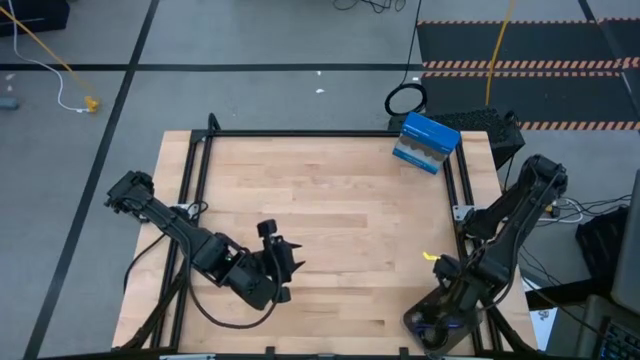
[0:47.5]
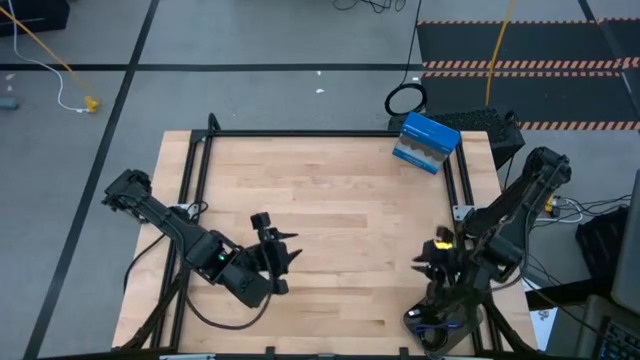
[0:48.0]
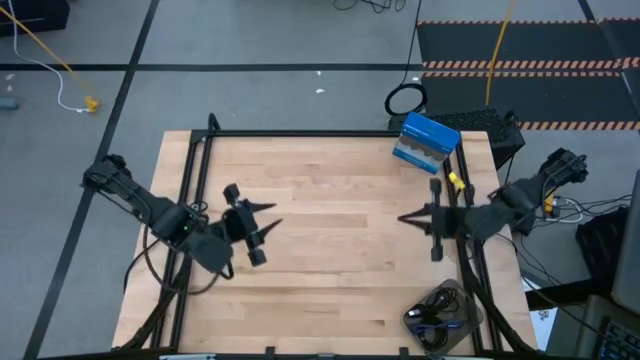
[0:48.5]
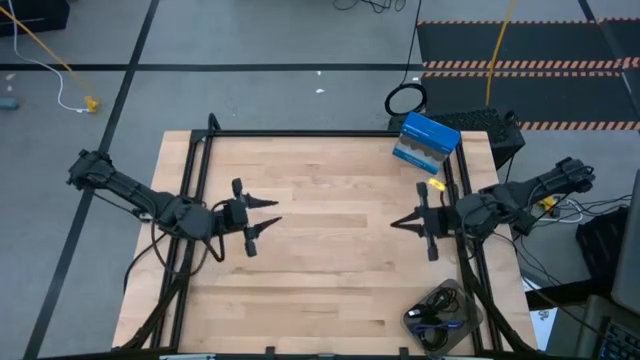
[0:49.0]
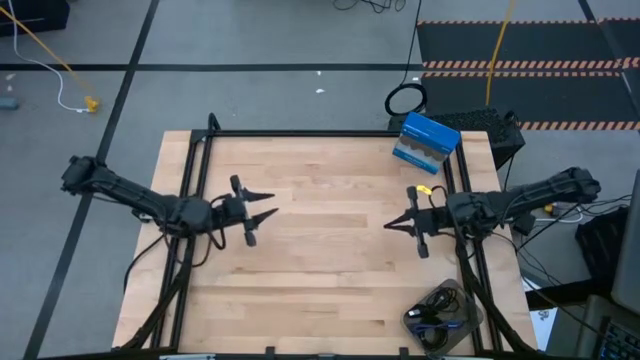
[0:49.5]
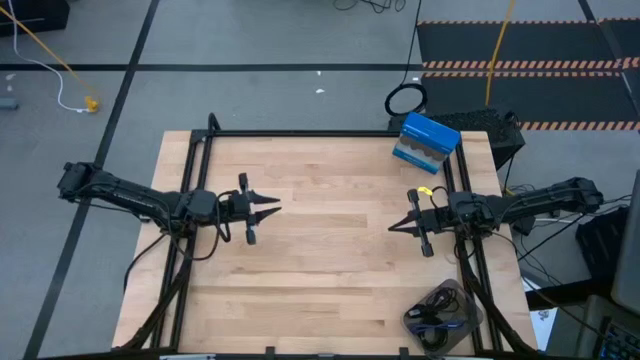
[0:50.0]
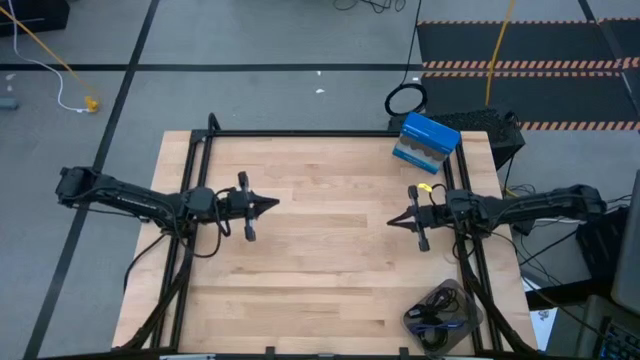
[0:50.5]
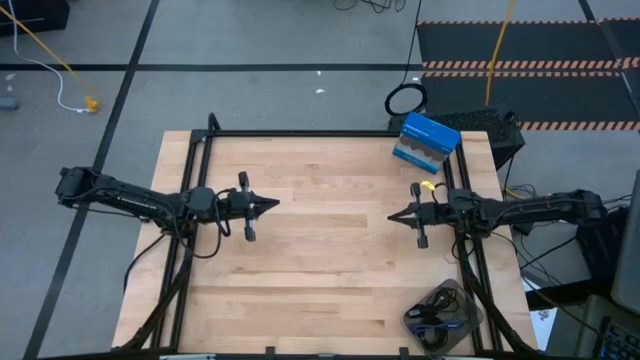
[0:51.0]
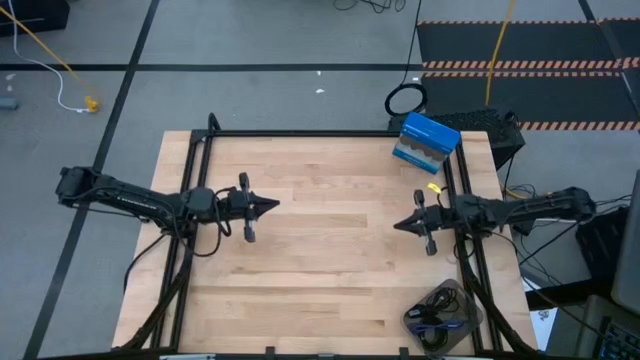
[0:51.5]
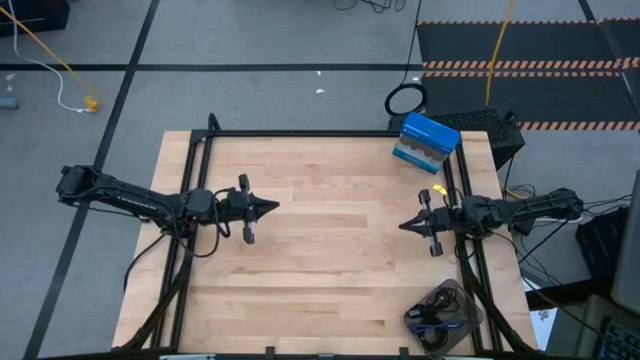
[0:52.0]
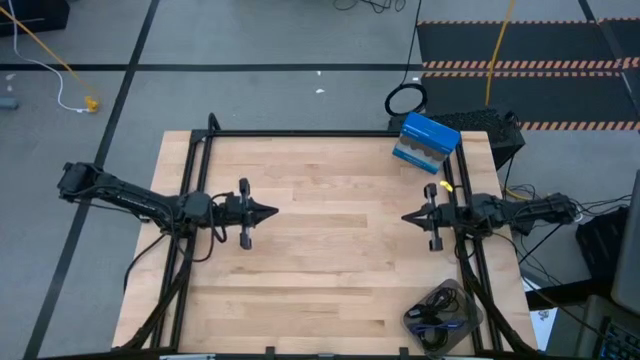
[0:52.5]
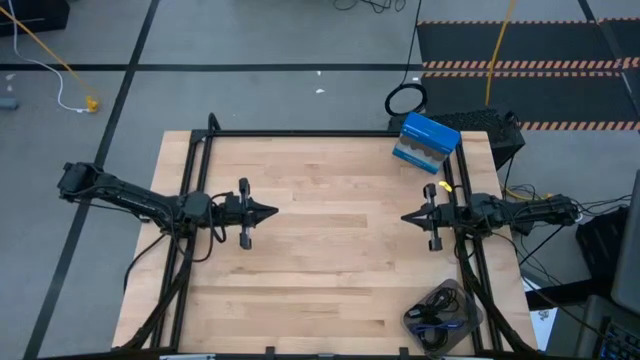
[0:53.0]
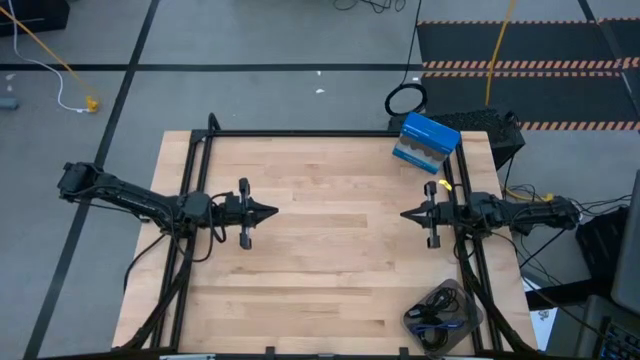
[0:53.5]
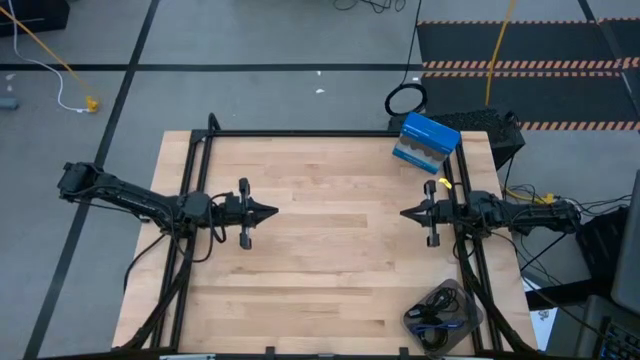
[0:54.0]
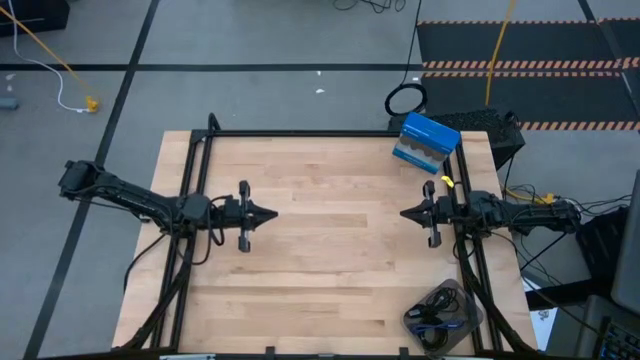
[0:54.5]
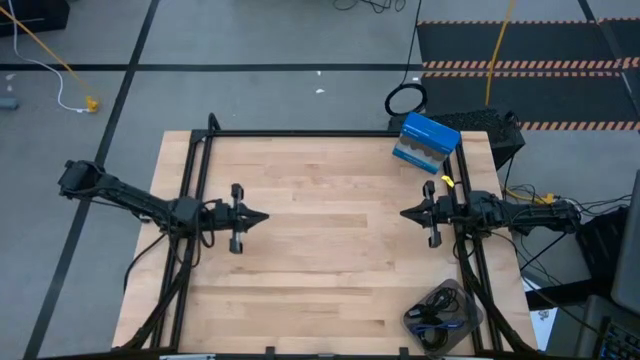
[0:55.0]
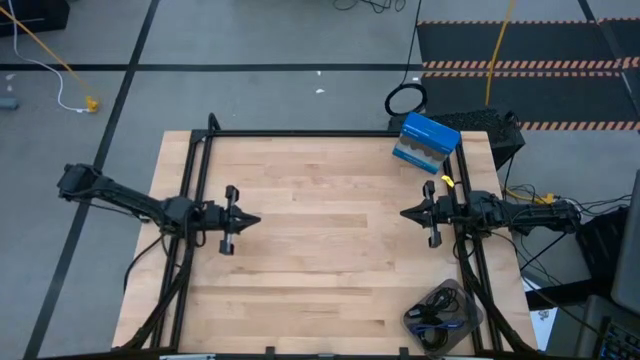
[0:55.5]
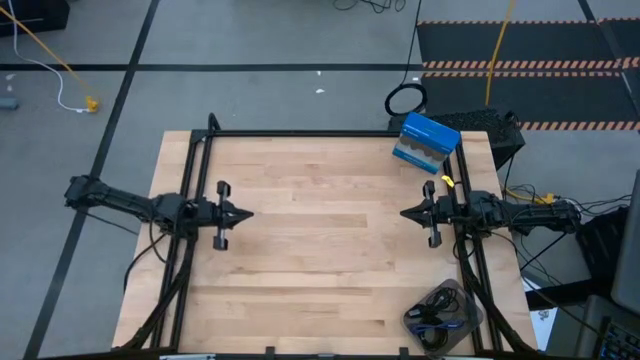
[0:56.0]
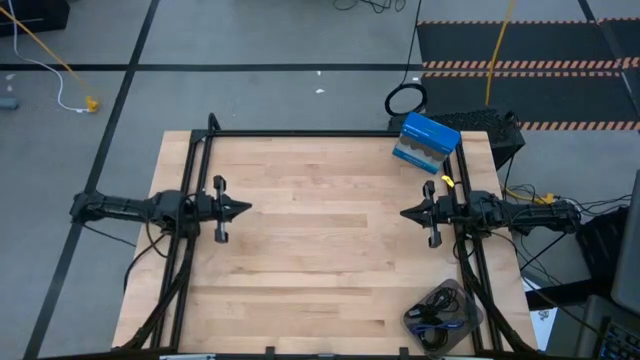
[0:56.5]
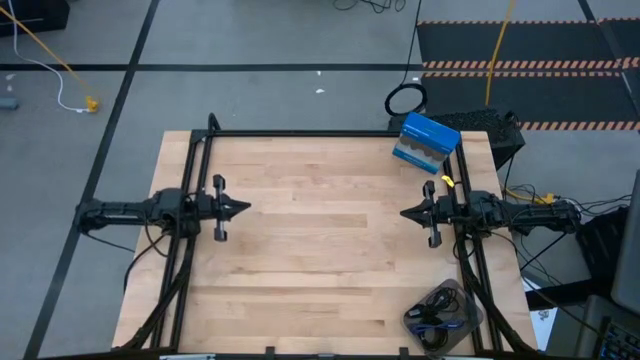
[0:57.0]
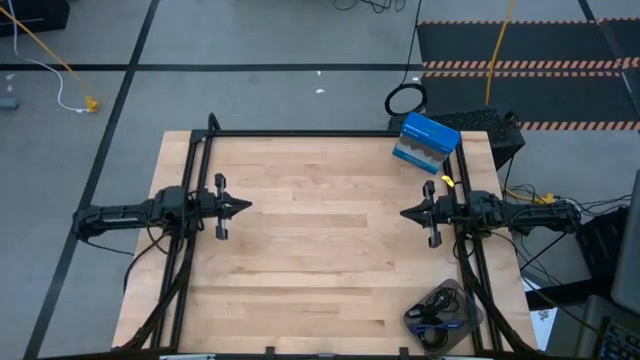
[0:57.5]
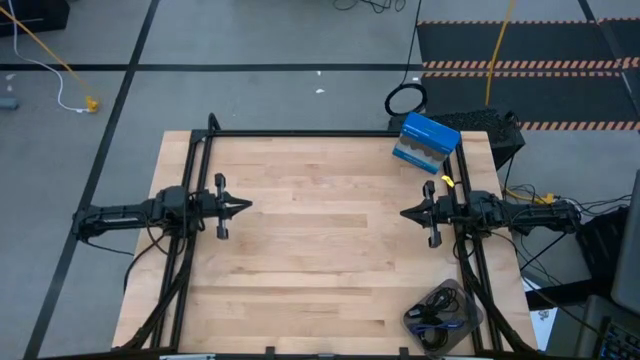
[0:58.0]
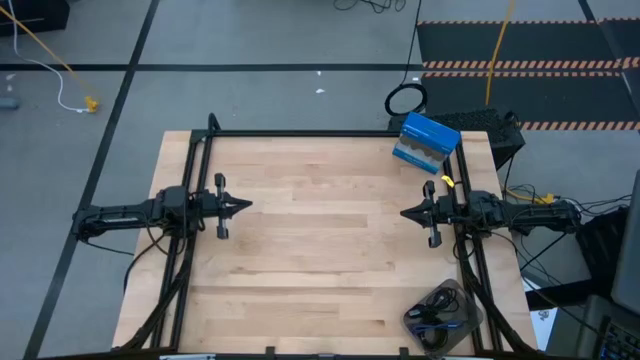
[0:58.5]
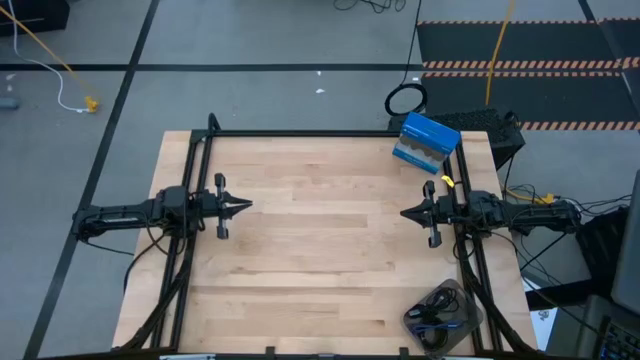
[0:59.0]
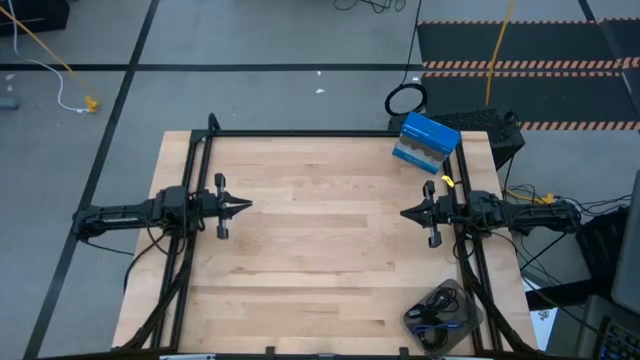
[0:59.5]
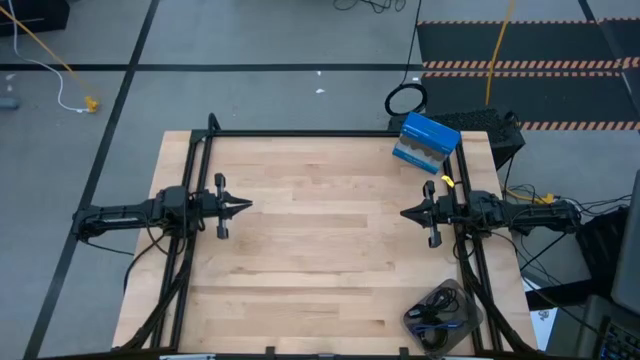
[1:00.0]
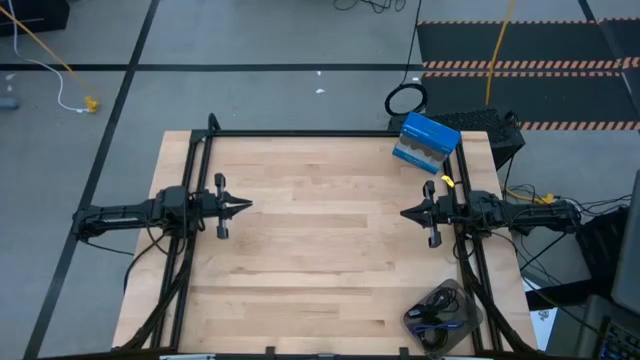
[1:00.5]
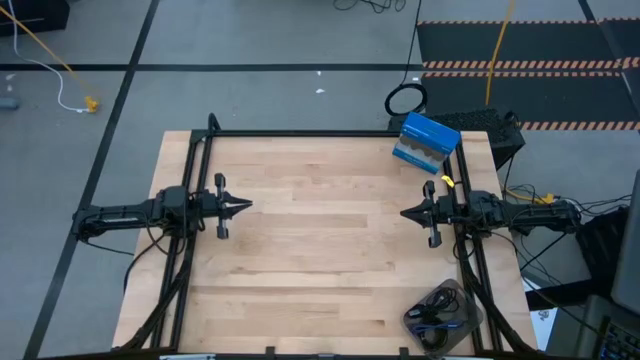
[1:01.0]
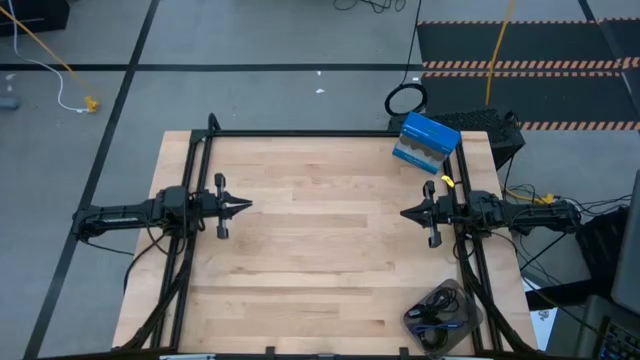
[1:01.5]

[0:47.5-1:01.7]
Task: Pick and place USB-C Cables
Return to Home Position
